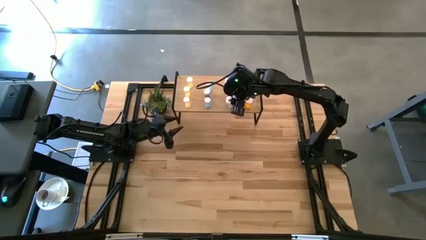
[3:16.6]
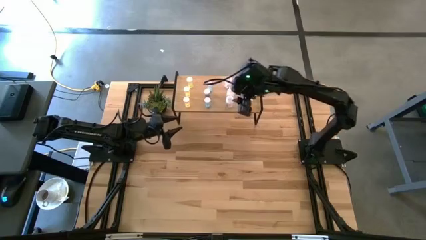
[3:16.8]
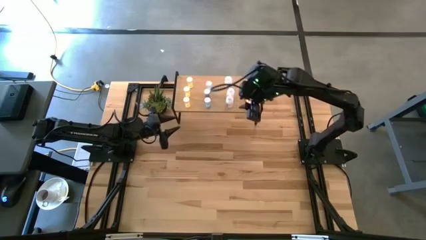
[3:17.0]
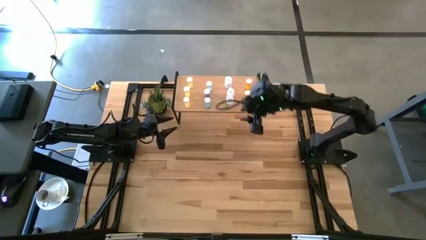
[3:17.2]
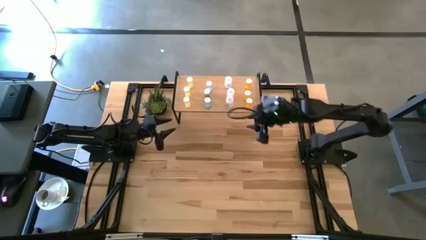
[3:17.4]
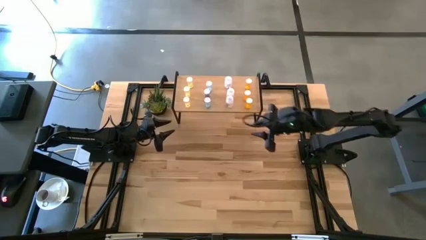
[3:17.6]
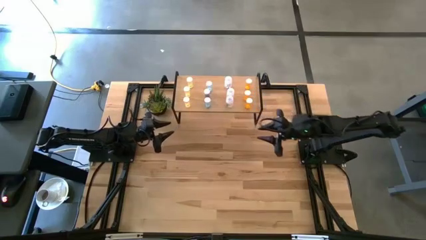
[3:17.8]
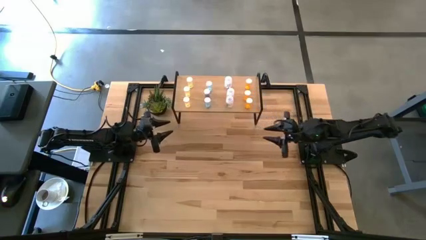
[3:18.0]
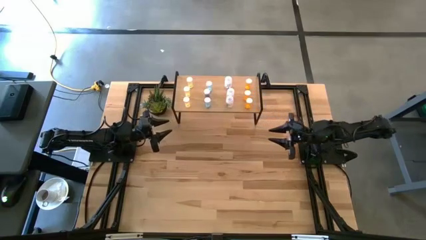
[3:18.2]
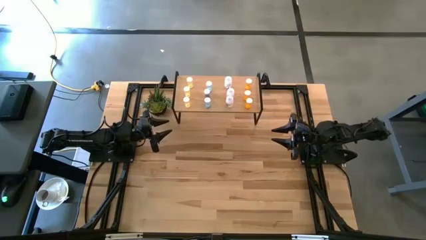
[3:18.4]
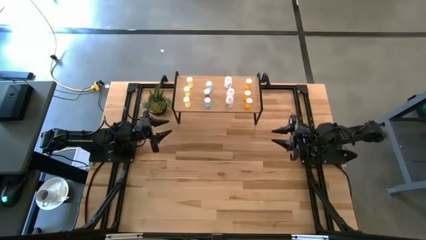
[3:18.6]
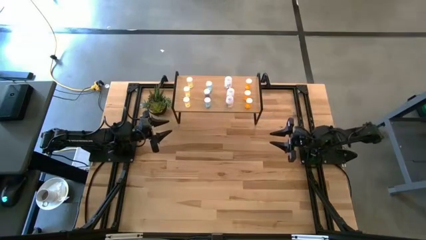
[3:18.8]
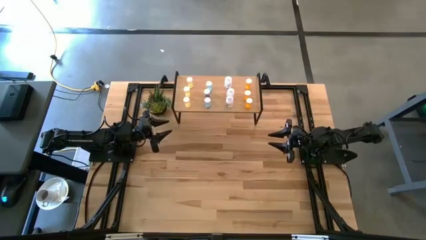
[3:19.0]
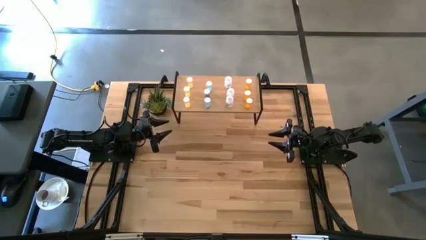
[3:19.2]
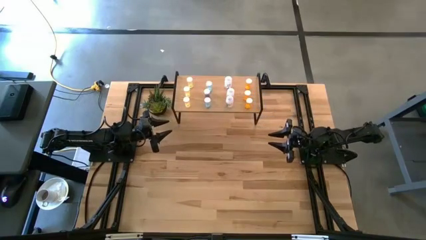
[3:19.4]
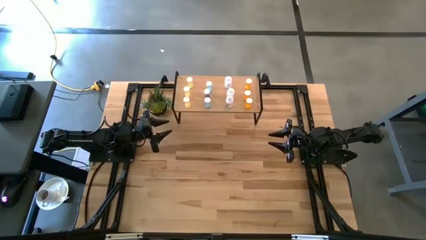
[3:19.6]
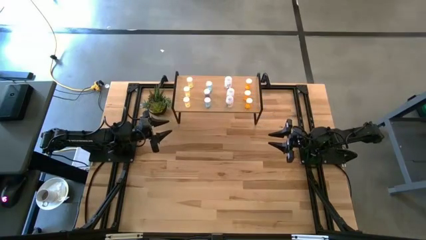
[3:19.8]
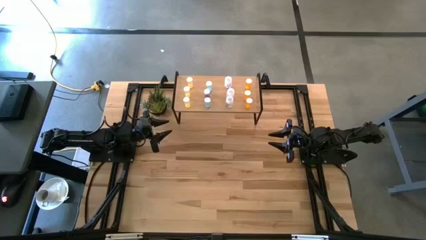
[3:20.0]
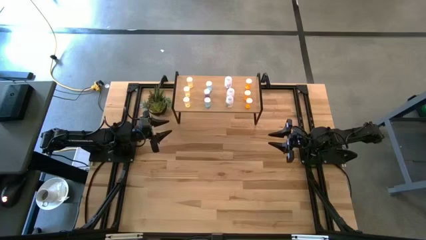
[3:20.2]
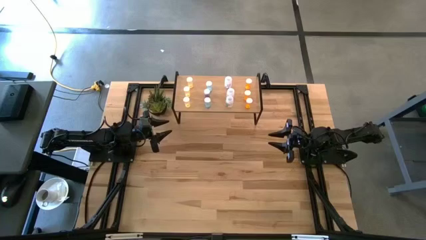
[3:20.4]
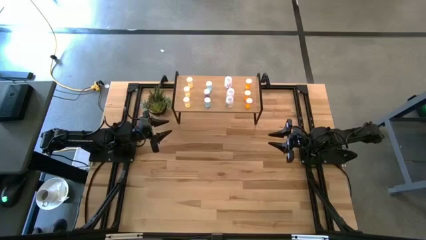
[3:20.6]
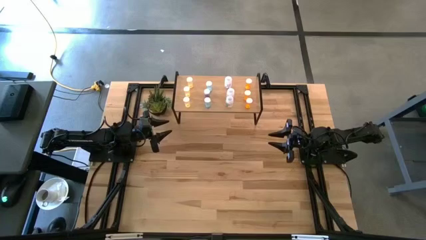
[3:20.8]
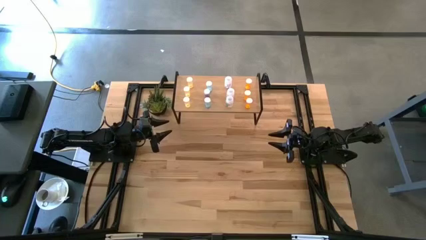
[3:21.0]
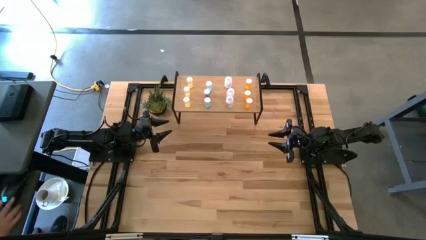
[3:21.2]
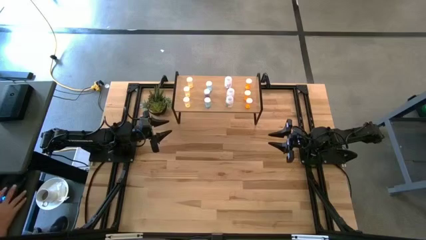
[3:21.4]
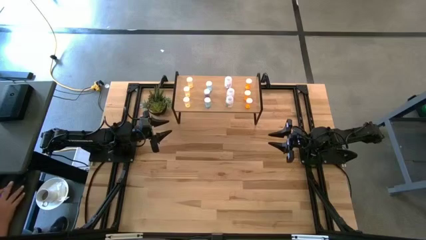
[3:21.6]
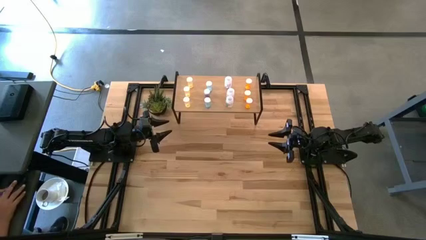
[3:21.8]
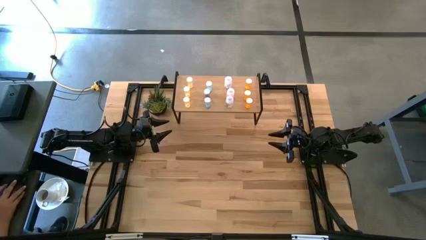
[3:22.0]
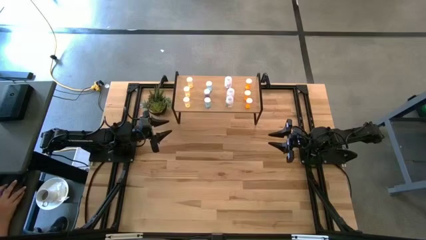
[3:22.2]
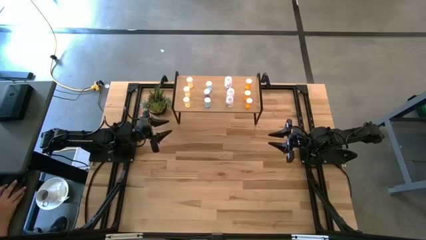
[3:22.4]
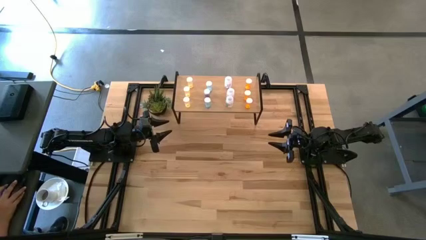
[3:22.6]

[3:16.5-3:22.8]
Task: Pick and place medicine bottles onto shelf by color
Return to Home Position

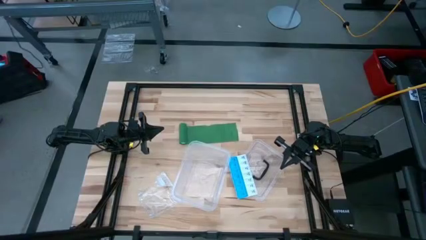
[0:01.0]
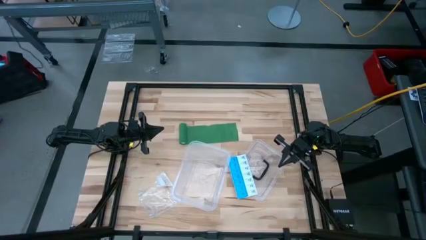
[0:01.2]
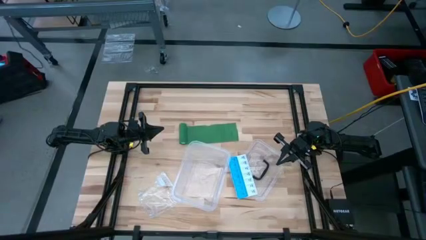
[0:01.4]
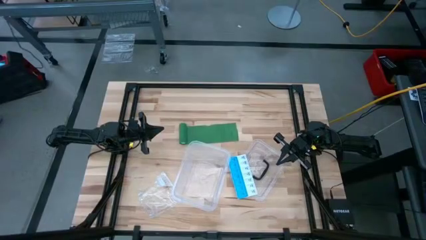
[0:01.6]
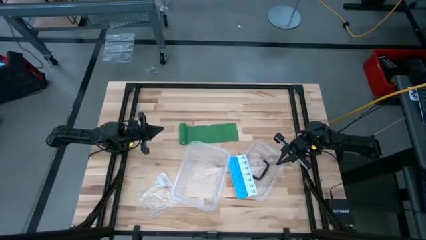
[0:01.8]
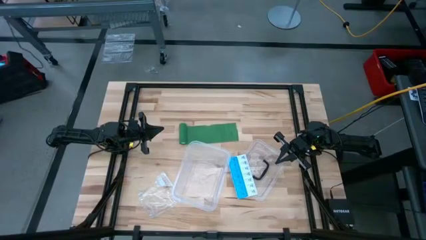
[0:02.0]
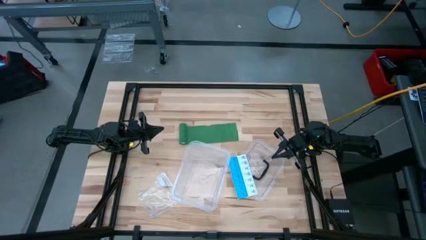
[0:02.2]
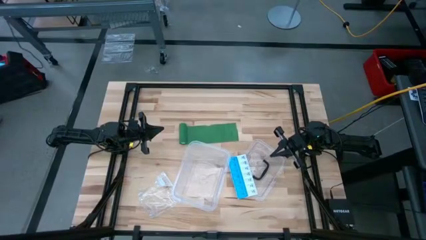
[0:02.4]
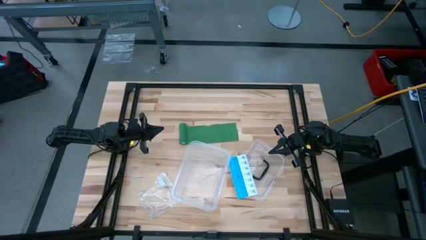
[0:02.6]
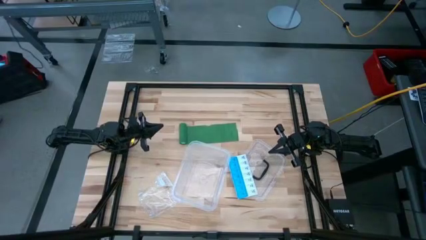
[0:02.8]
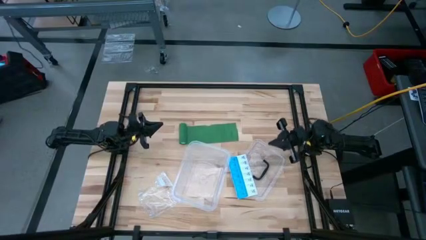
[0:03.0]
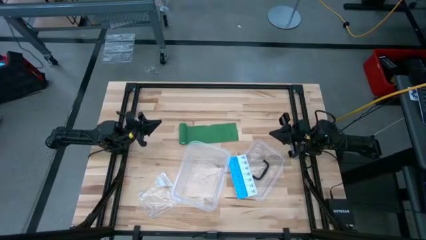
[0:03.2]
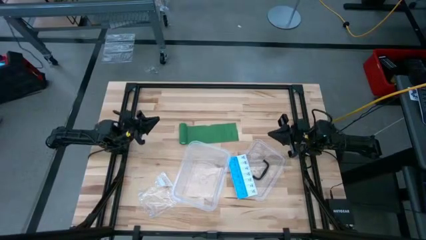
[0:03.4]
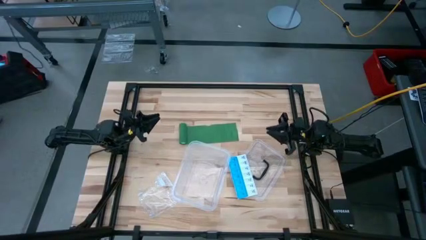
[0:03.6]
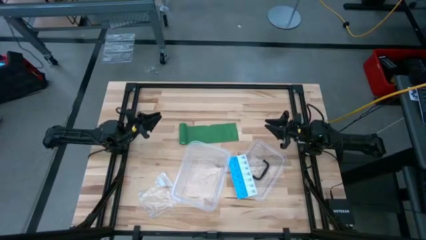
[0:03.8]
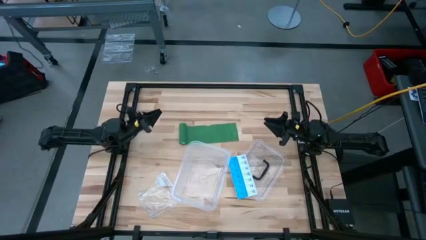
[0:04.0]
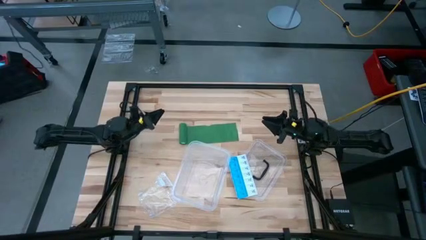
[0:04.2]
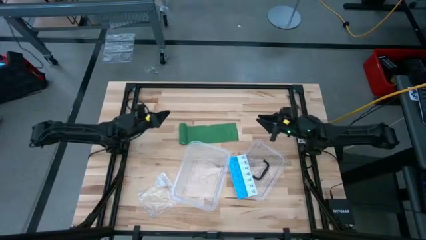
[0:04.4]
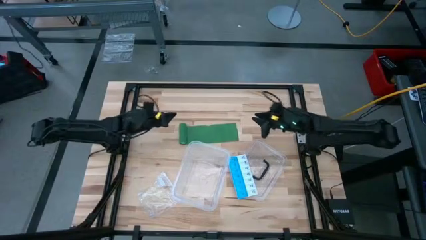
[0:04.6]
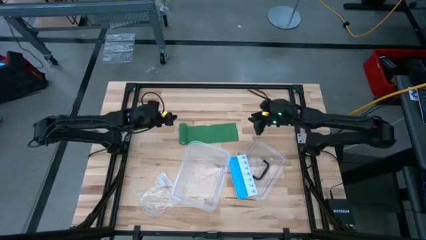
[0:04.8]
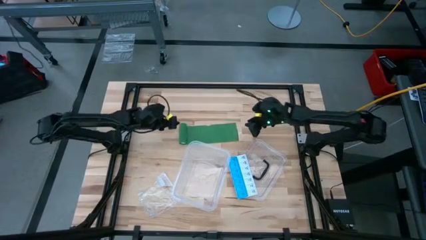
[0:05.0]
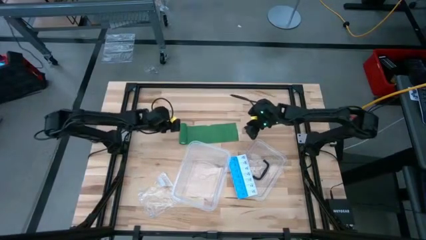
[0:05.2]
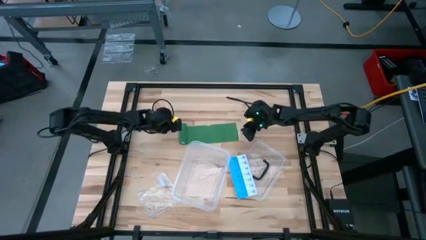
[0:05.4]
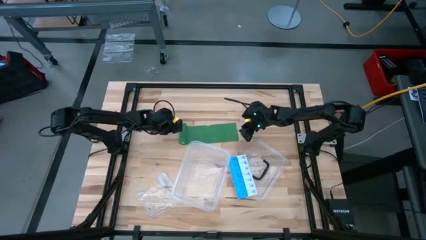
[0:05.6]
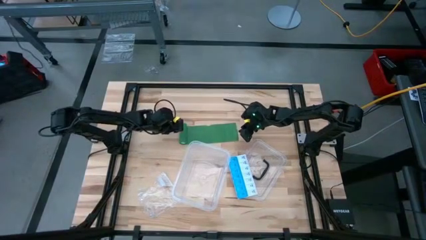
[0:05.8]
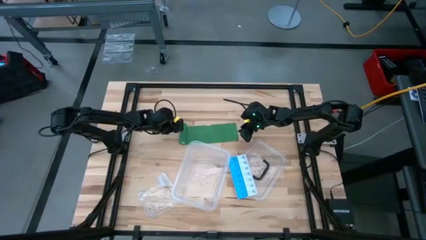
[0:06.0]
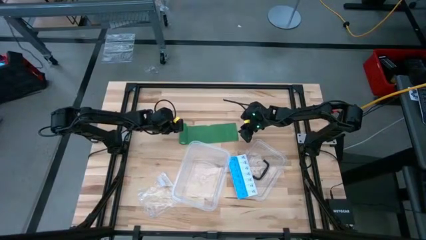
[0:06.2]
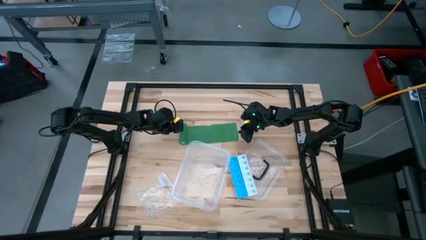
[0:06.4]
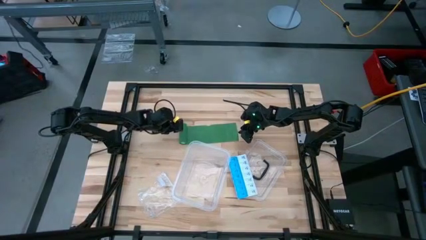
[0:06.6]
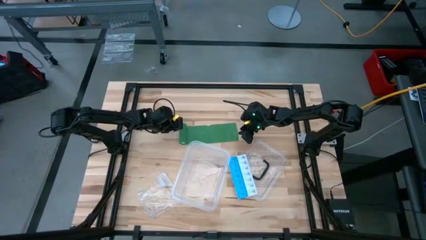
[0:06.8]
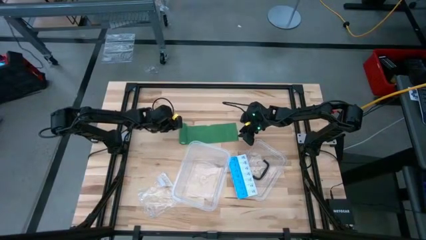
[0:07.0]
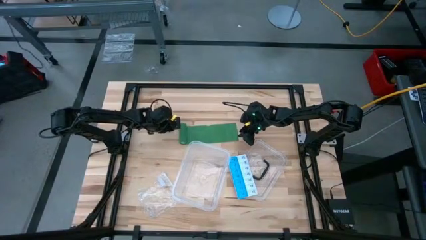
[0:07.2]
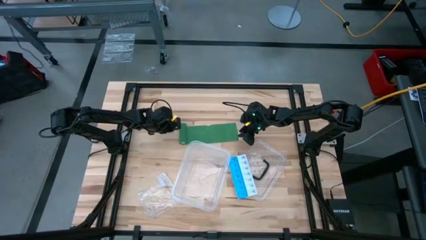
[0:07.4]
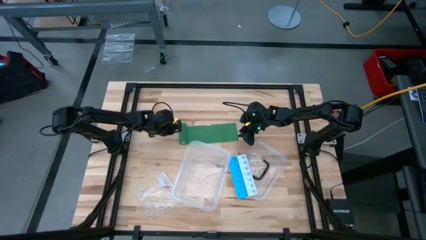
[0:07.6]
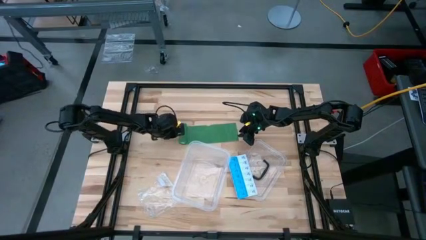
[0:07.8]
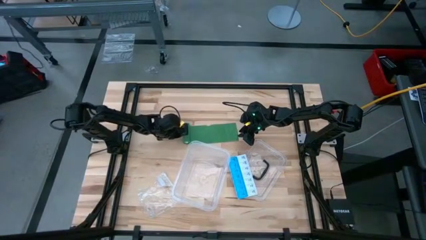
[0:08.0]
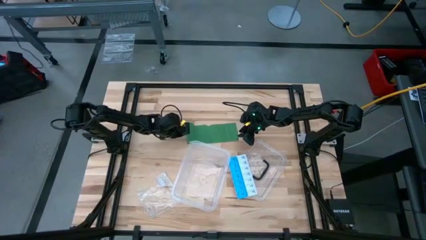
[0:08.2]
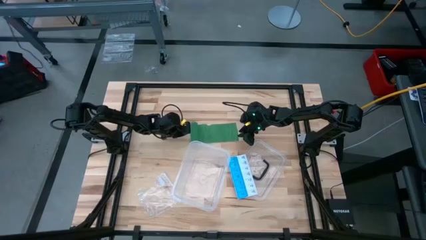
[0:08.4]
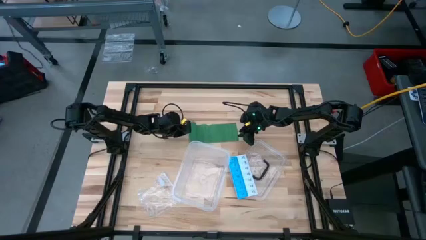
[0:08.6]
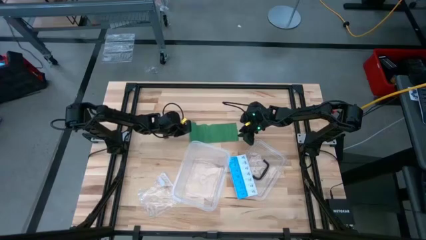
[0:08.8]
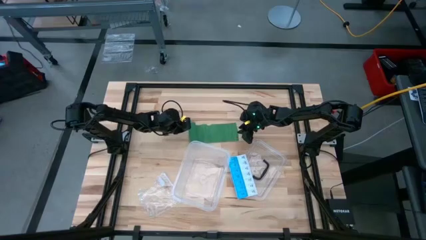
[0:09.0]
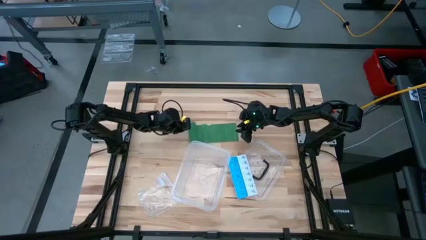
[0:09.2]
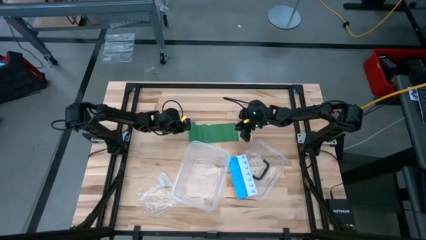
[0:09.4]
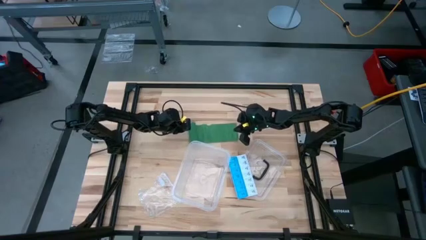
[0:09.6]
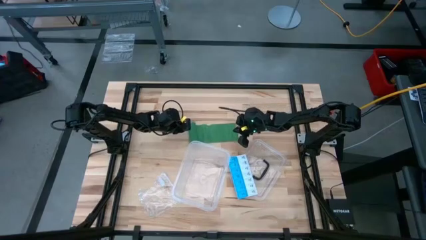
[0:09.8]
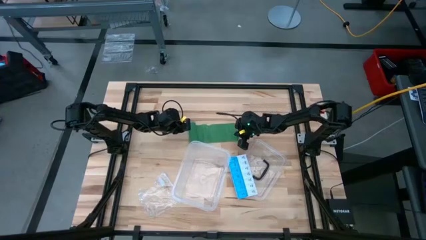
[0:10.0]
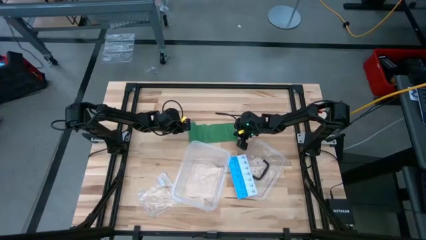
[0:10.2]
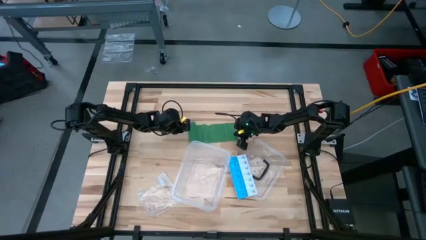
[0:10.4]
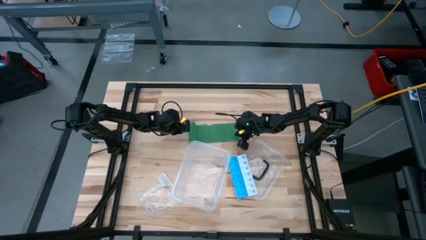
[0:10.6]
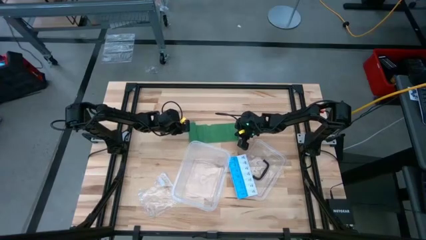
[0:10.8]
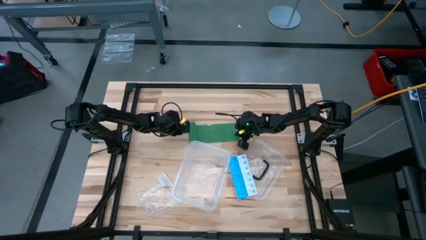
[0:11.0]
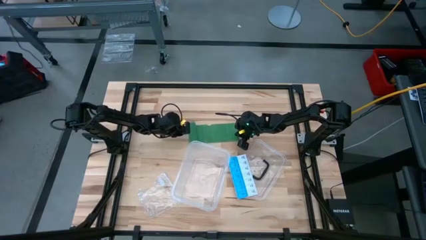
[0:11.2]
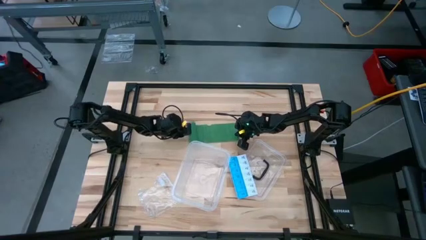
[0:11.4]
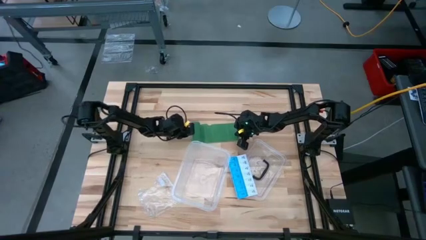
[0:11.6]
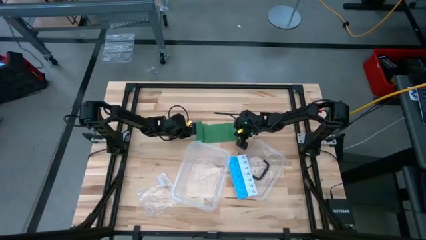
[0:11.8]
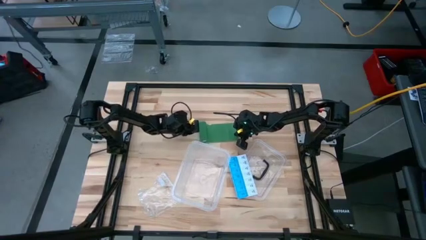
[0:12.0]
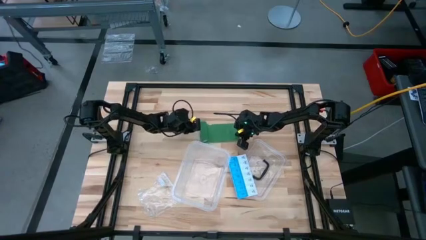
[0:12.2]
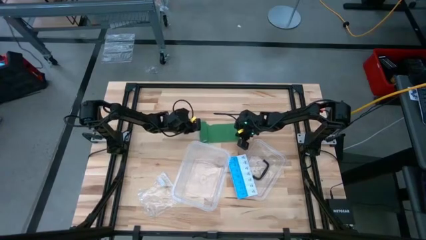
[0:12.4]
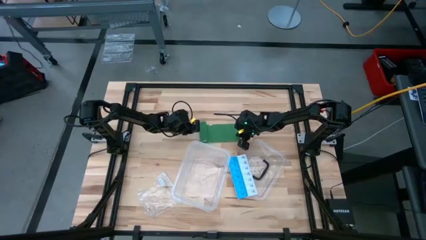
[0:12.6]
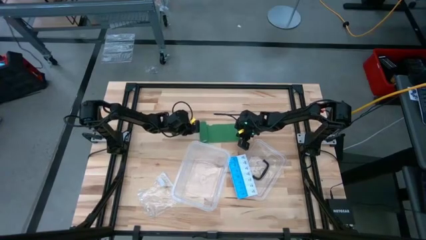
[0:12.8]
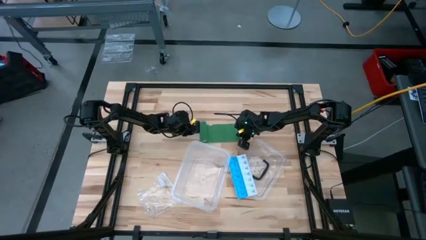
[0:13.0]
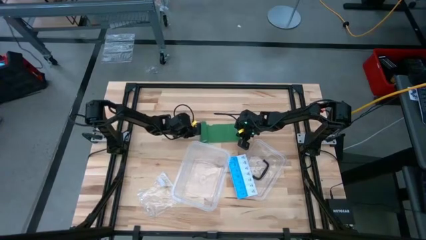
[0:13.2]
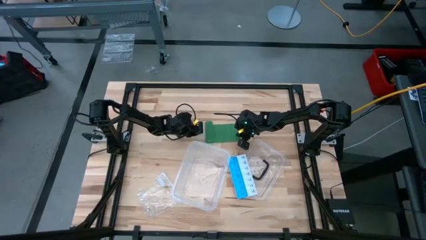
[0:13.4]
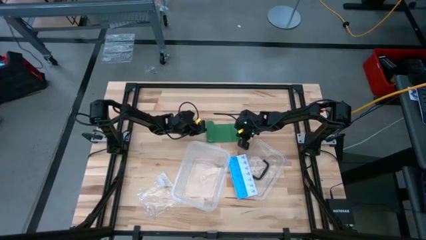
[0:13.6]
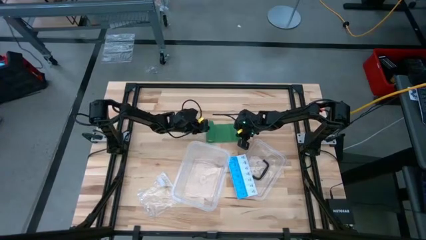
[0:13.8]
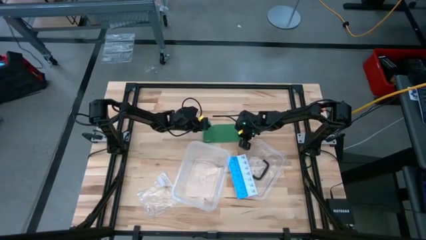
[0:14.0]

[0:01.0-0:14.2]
Task: Roll bandage
Roll the green bandage
